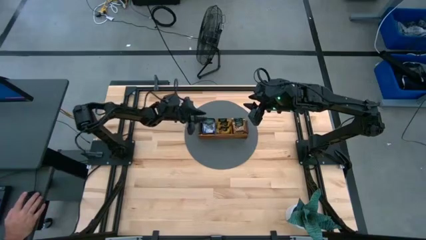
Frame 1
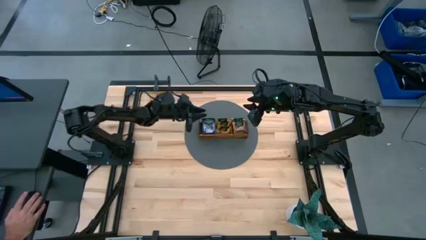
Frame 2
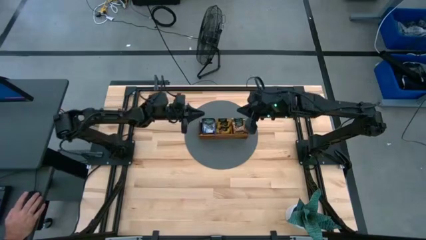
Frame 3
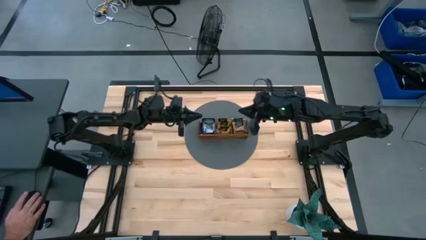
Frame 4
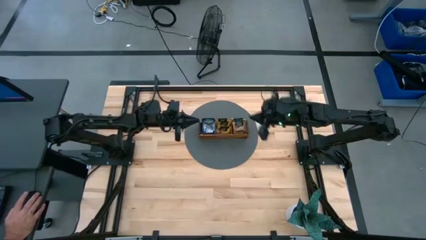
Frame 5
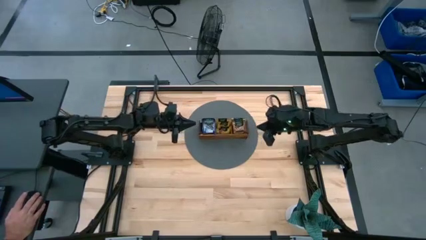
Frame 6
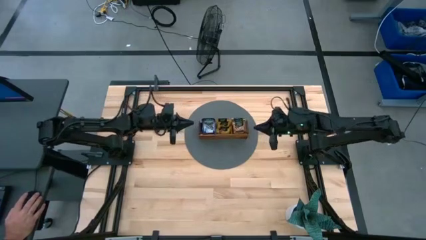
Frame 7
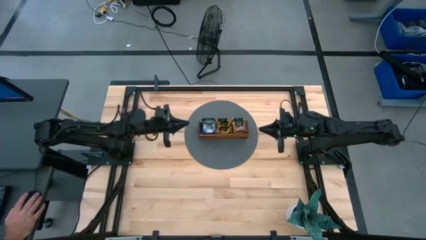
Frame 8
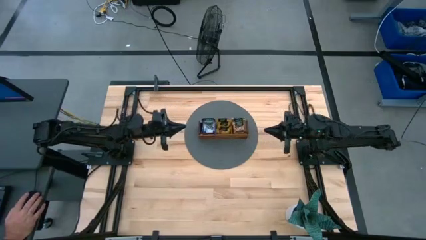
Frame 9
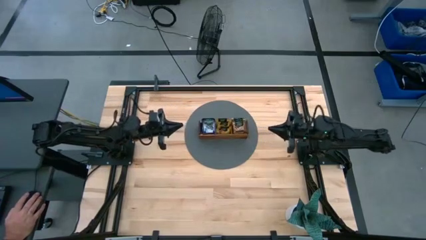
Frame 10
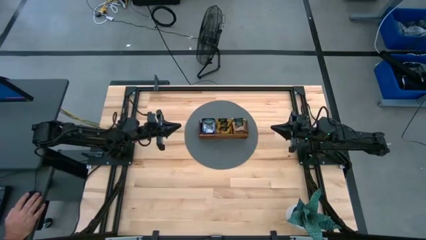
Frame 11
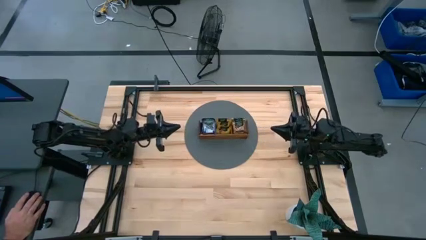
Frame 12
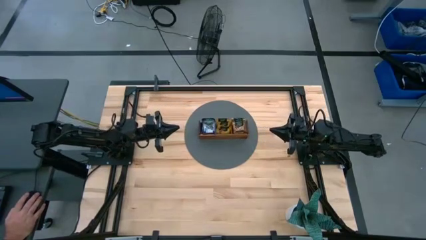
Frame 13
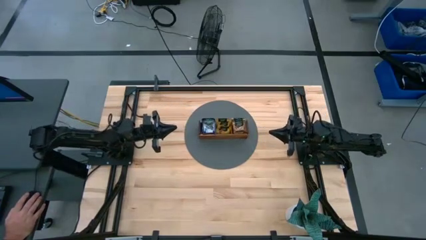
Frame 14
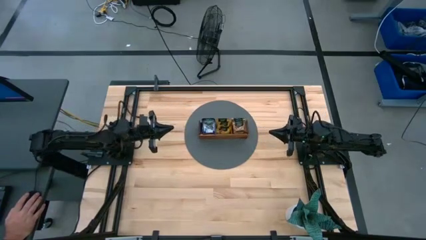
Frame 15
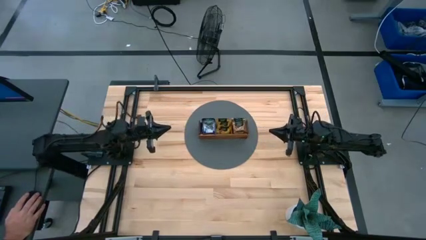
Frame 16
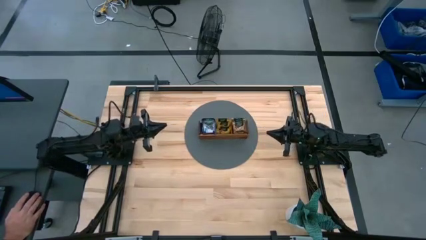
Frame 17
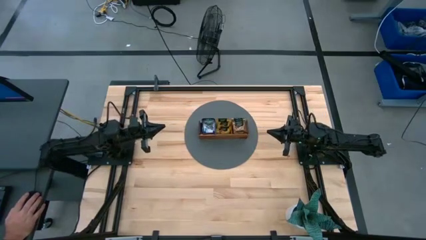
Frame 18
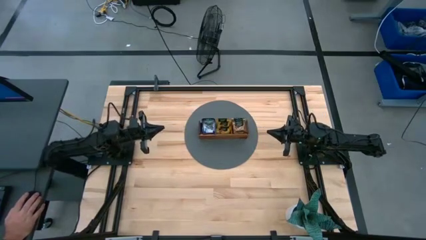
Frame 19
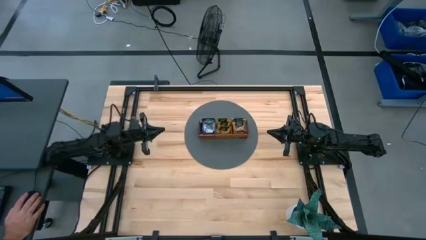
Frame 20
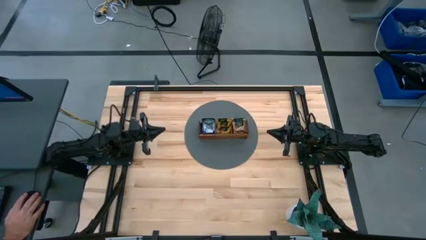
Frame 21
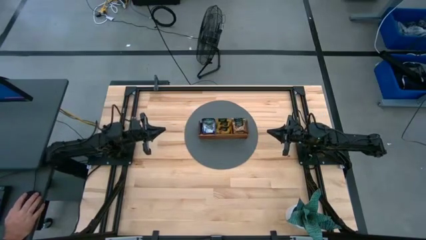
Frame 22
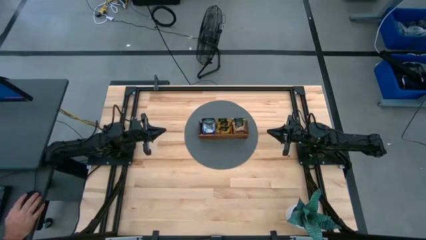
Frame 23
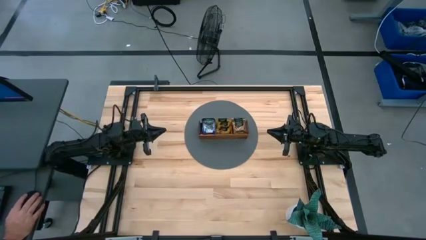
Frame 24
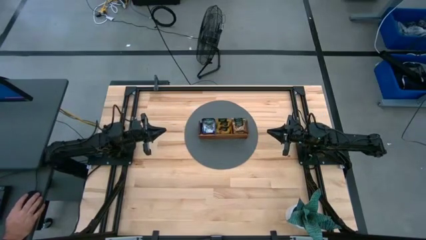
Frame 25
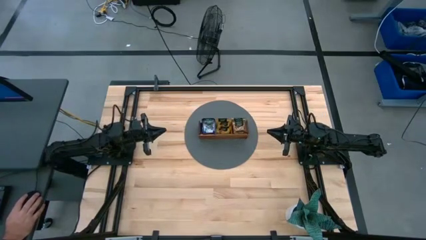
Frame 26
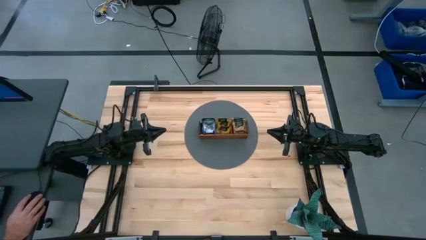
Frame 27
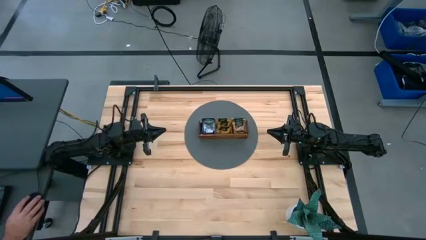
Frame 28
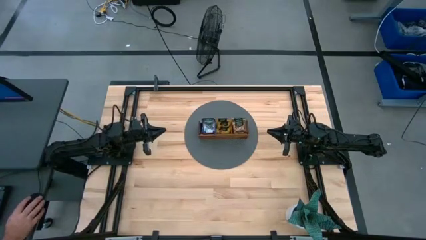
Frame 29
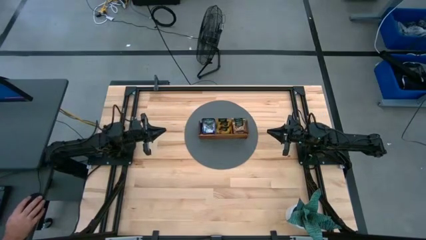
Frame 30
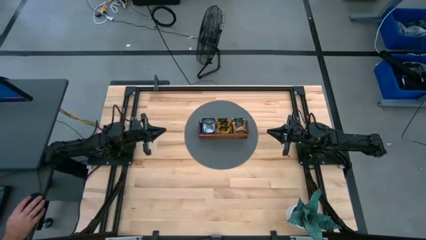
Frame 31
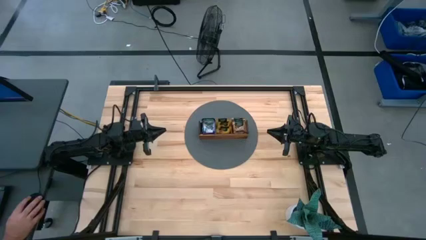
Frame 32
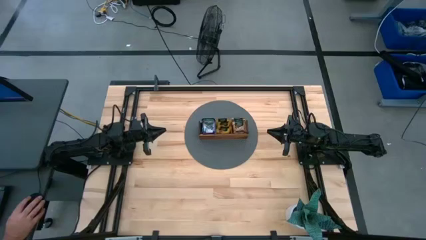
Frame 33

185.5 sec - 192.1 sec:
Task: Pick & Place Tea
Return to Home Position

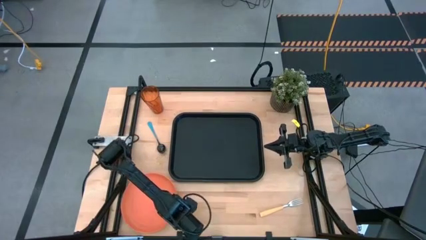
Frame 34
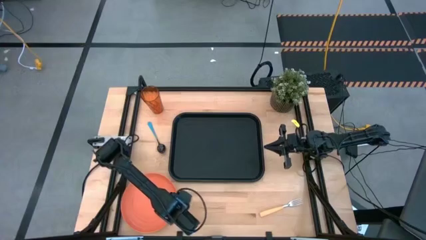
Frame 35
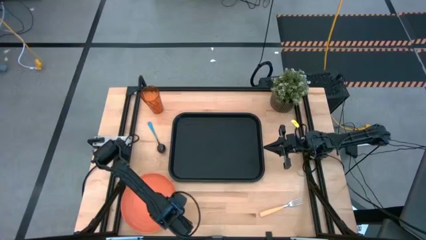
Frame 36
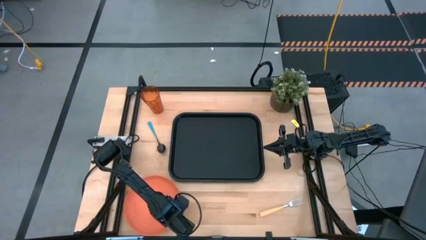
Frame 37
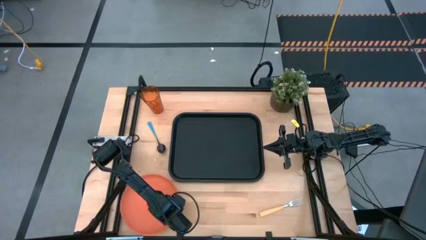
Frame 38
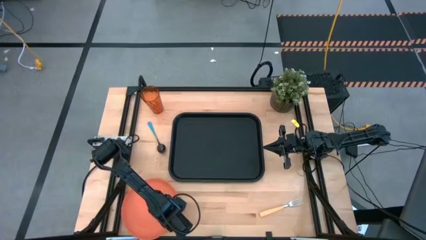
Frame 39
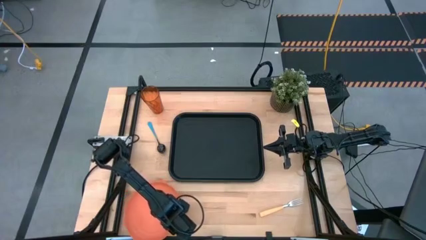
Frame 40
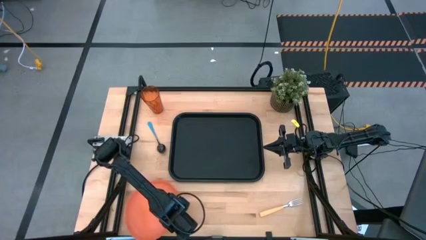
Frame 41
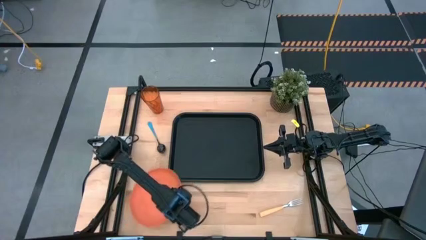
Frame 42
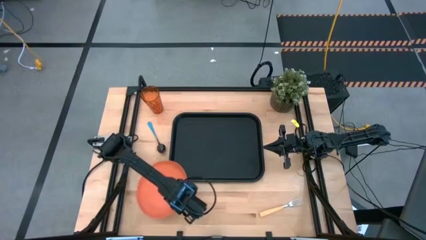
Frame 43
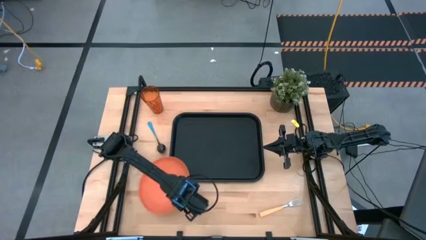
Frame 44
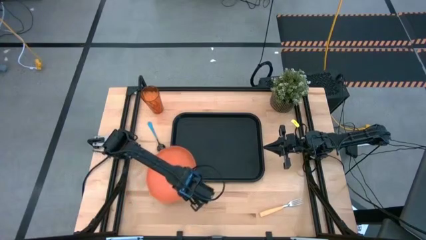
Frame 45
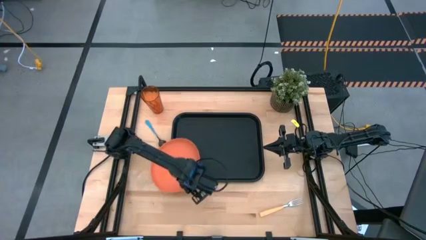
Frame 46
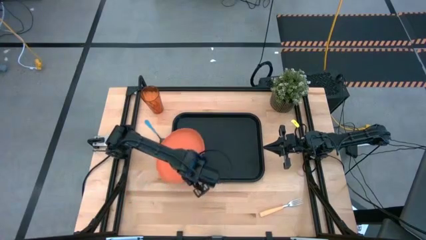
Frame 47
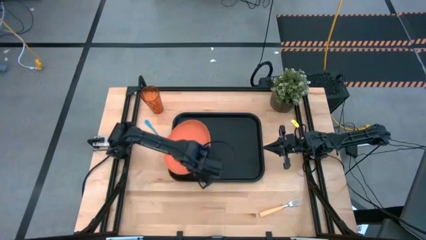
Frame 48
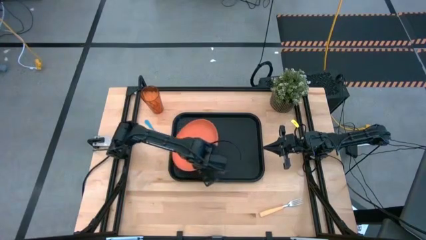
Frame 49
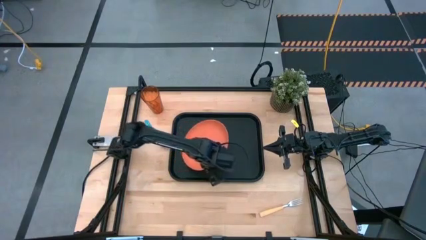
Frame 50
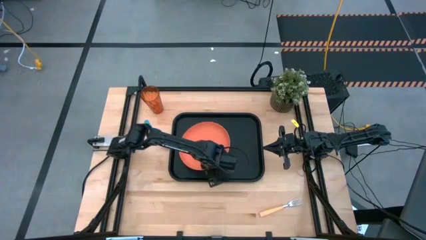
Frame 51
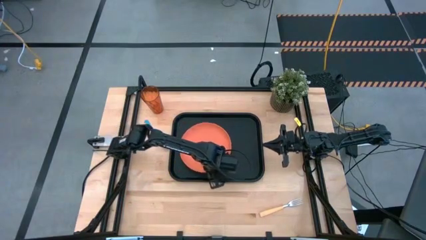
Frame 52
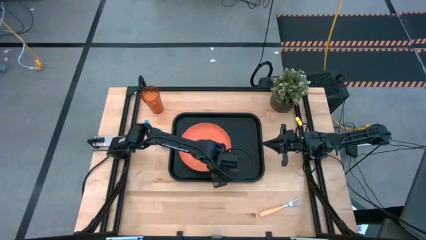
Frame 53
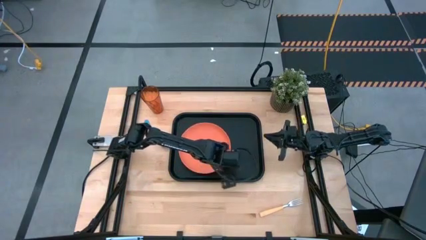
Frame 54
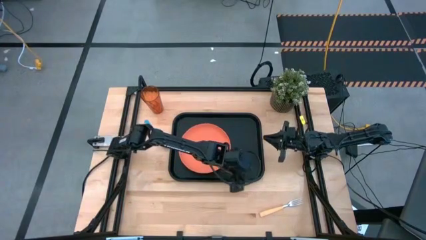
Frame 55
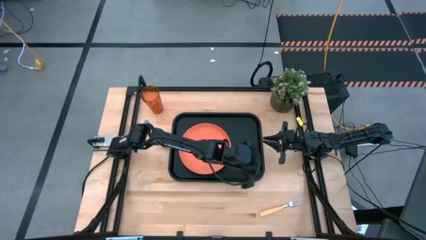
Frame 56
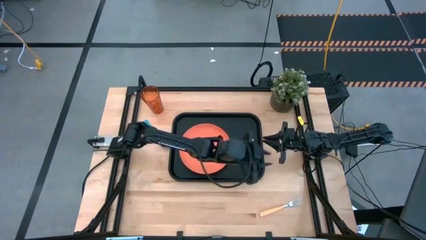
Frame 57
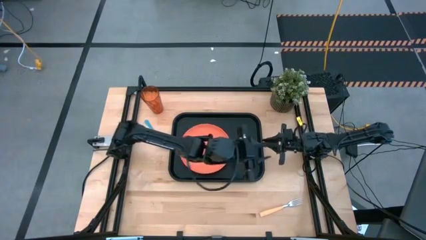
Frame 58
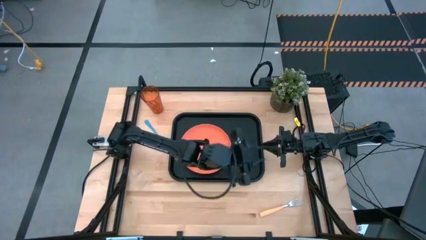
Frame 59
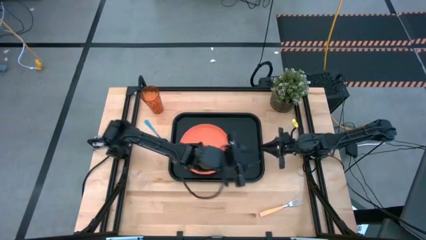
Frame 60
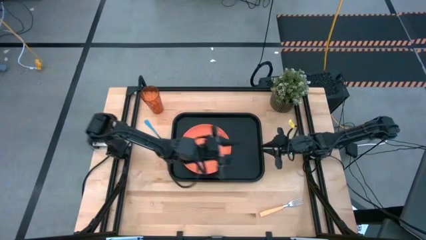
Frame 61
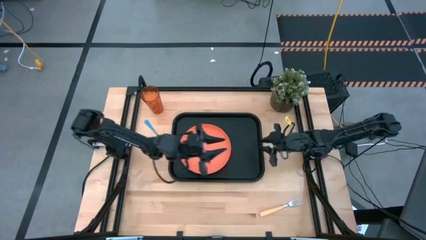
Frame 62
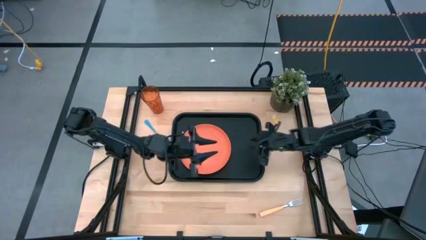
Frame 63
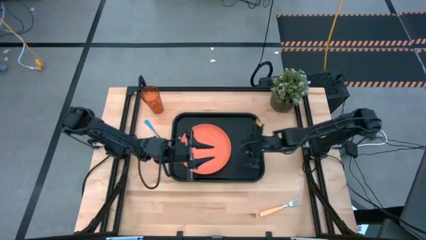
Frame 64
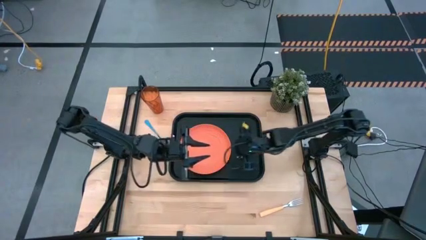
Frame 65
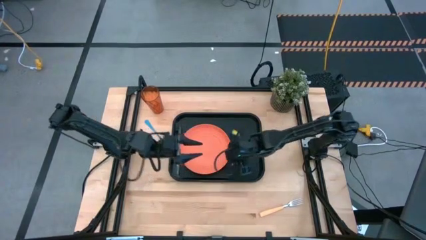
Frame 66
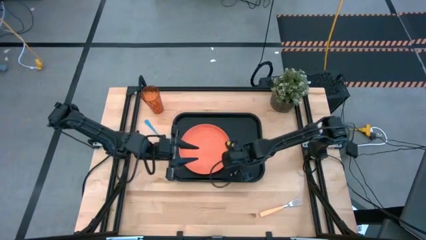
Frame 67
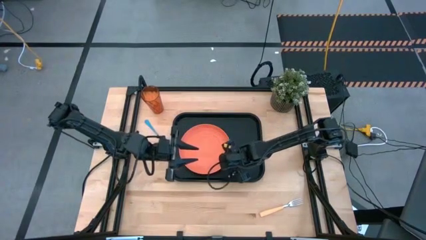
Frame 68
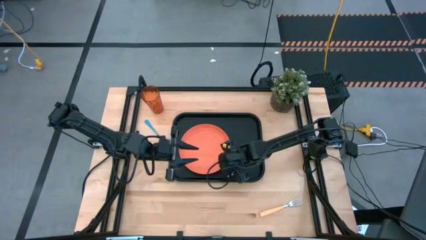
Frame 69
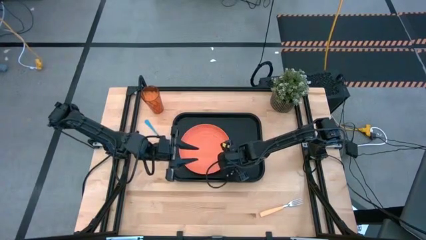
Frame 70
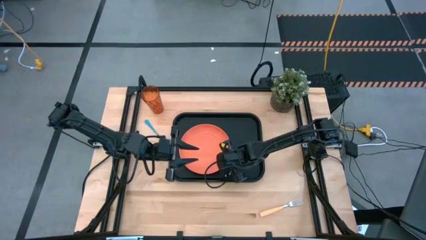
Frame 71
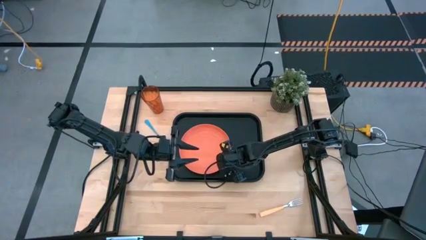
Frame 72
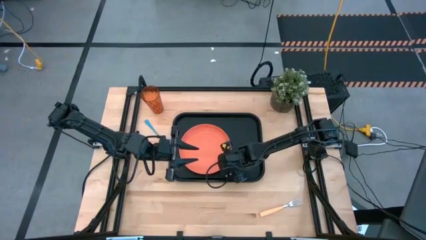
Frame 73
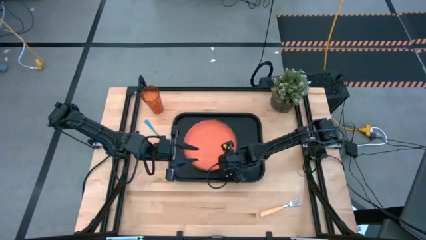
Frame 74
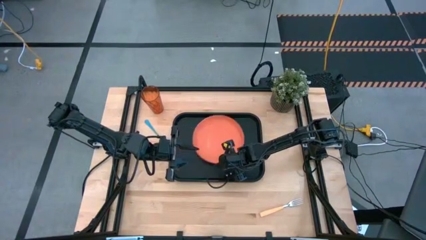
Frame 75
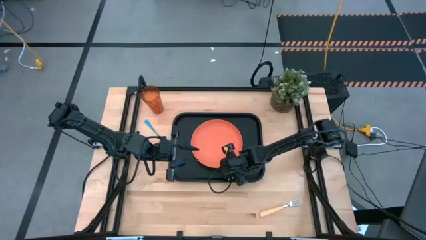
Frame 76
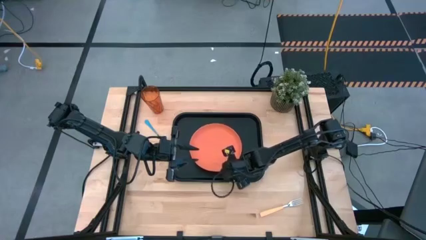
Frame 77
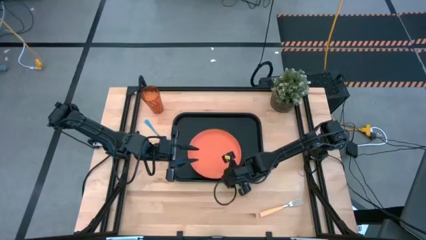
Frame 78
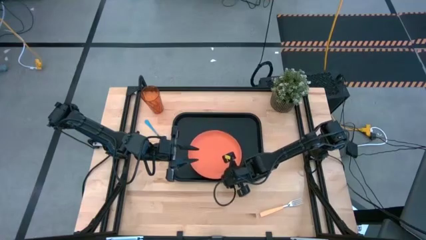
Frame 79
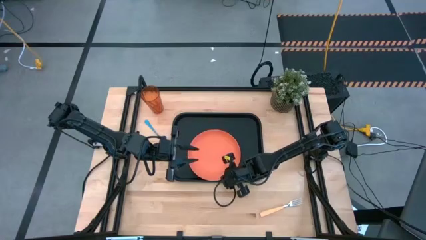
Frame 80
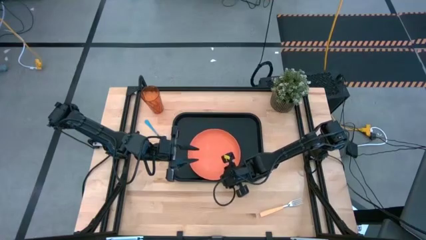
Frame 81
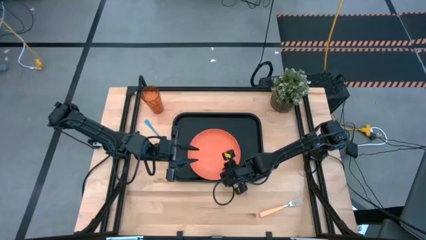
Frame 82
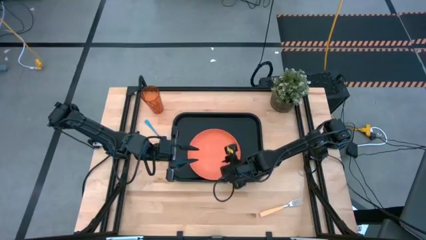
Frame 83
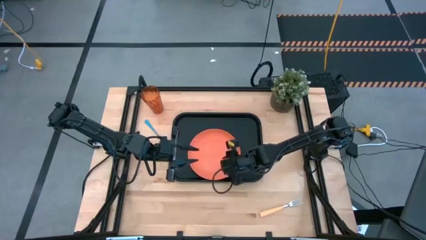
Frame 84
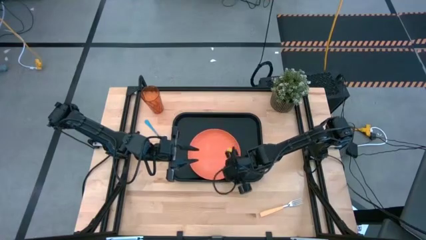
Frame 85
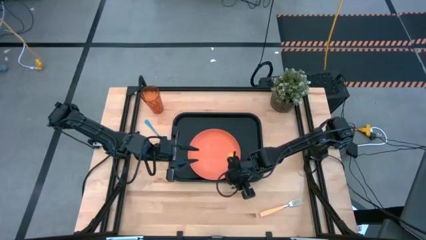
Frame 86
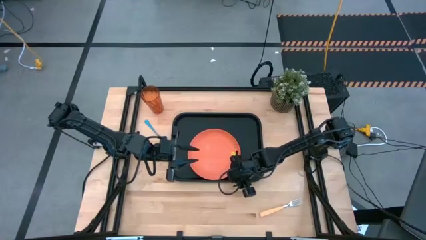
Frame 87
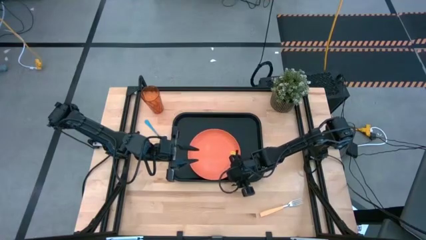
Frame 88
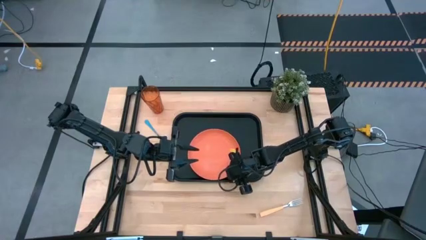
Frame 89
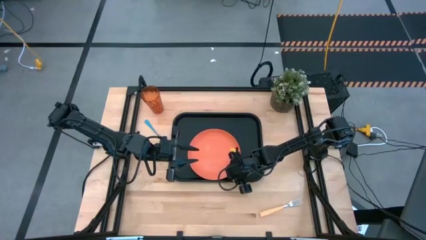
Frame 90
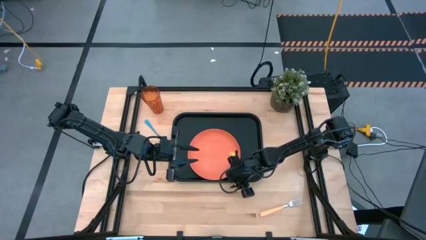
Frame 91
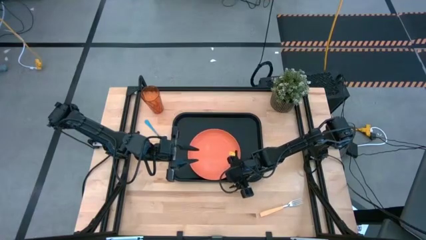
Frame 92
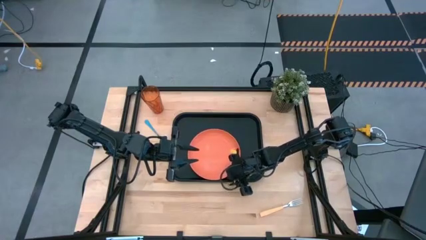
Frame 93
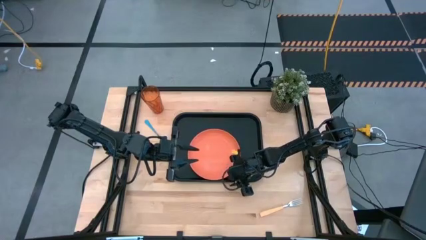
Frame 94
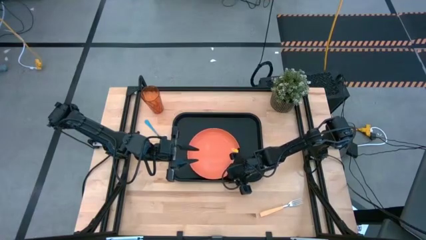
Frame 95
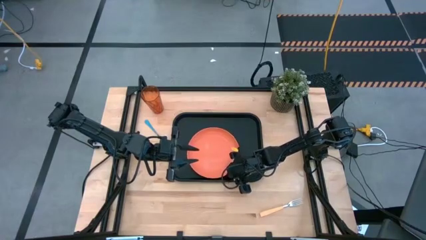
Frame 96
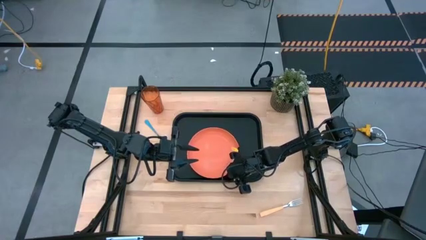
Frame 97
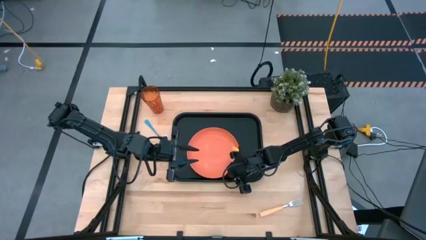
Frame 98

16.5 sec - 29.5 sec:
Task: Pick and place plate/cup/fork/spoon on tray
Put the orange plate on the black serving tray
